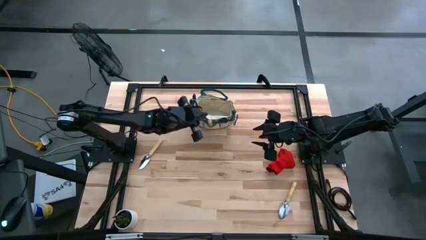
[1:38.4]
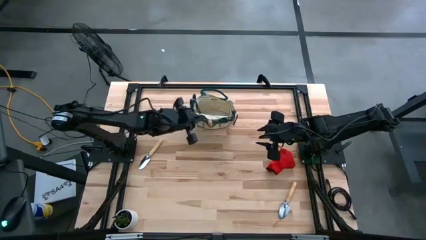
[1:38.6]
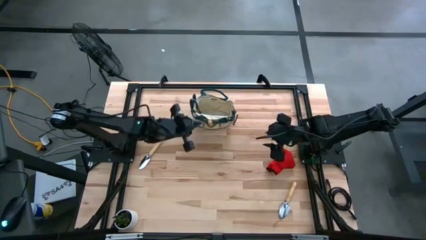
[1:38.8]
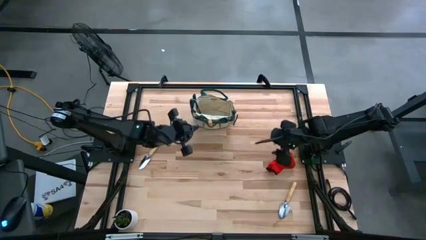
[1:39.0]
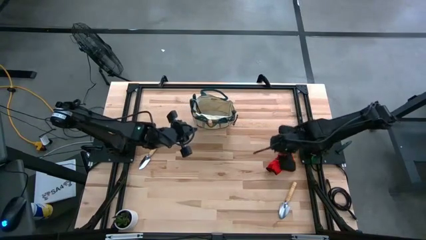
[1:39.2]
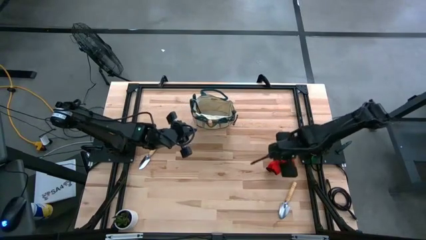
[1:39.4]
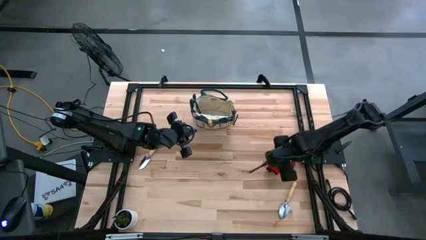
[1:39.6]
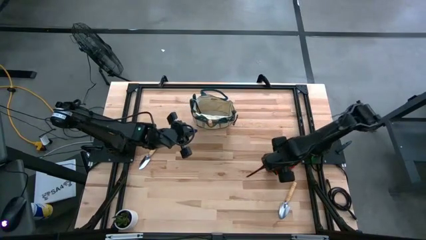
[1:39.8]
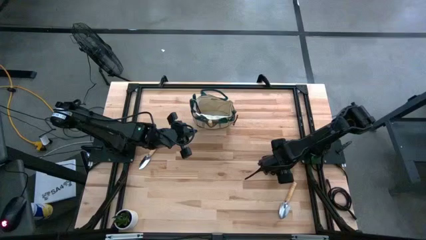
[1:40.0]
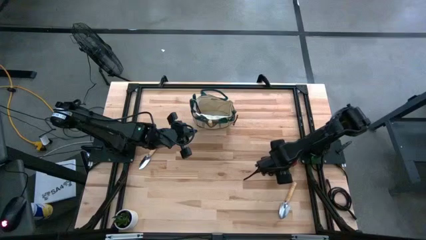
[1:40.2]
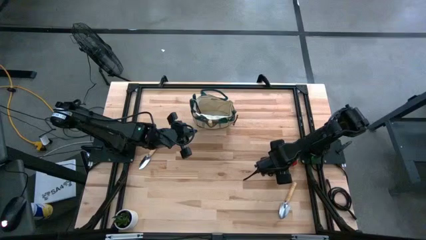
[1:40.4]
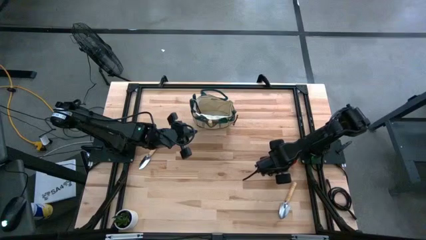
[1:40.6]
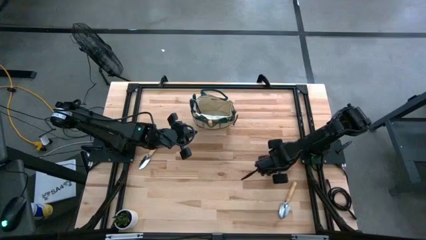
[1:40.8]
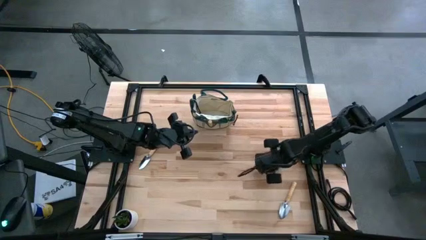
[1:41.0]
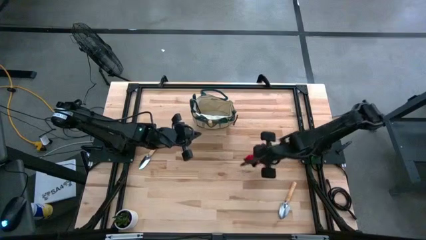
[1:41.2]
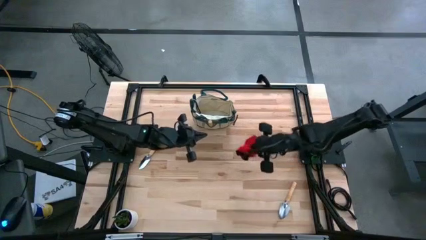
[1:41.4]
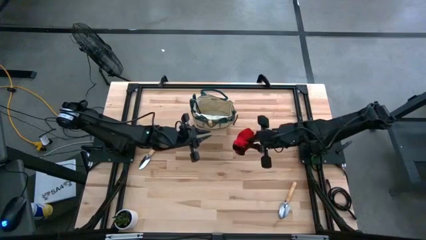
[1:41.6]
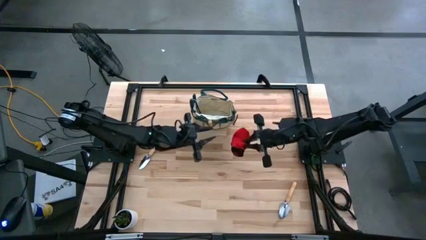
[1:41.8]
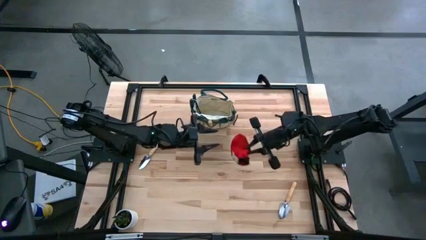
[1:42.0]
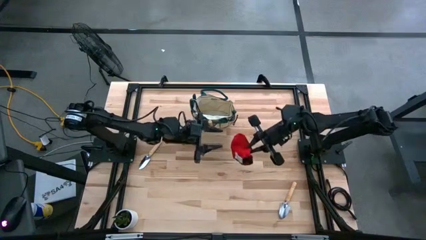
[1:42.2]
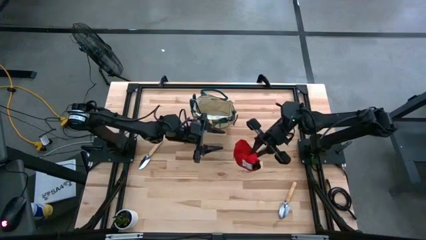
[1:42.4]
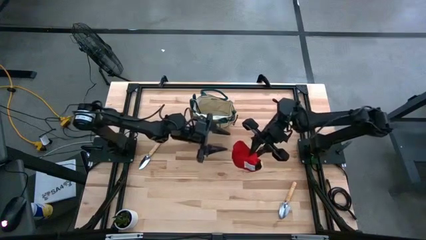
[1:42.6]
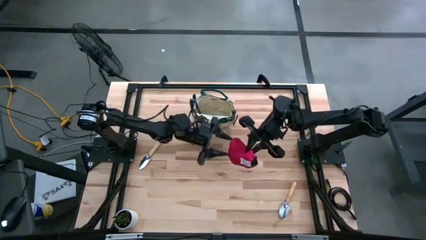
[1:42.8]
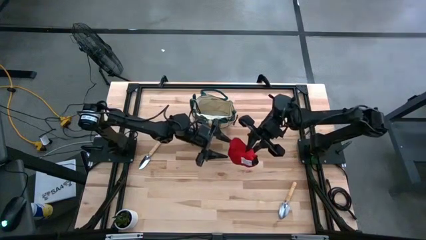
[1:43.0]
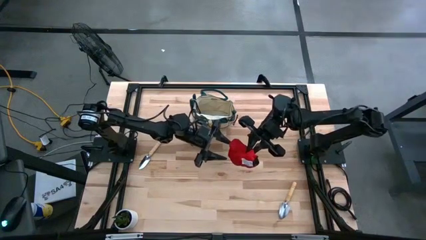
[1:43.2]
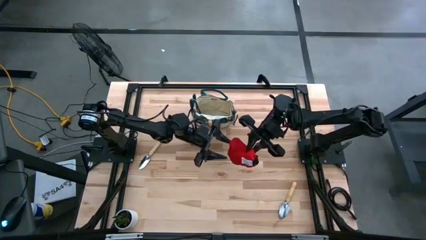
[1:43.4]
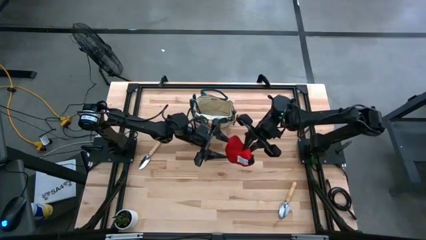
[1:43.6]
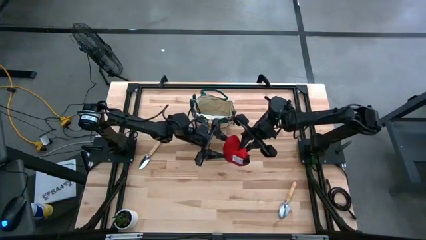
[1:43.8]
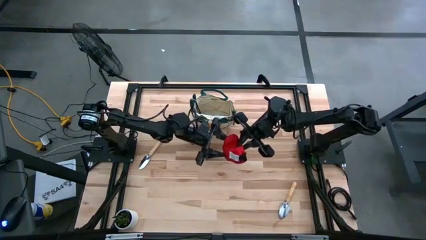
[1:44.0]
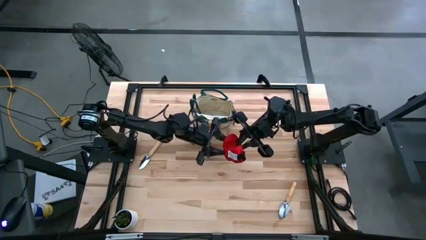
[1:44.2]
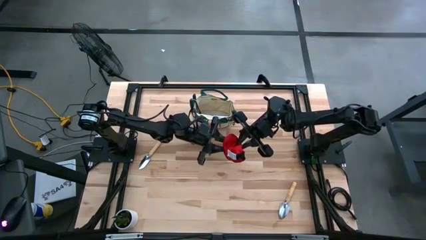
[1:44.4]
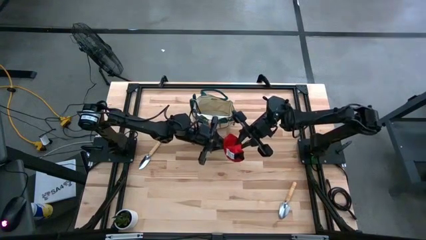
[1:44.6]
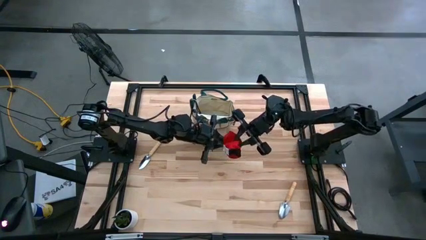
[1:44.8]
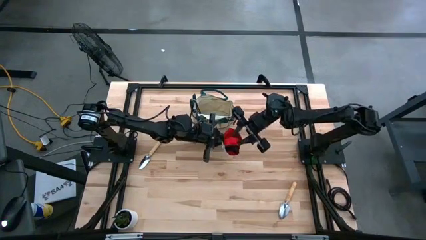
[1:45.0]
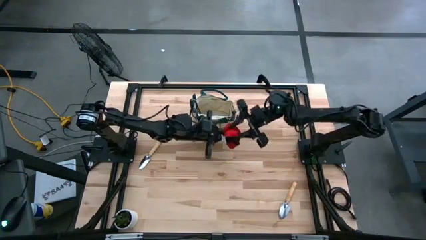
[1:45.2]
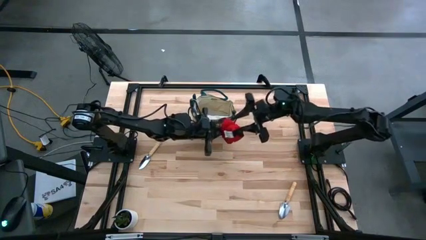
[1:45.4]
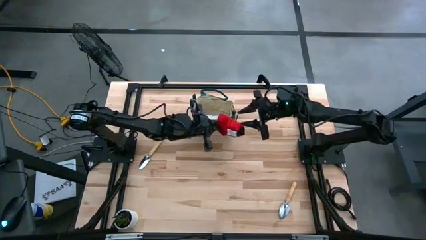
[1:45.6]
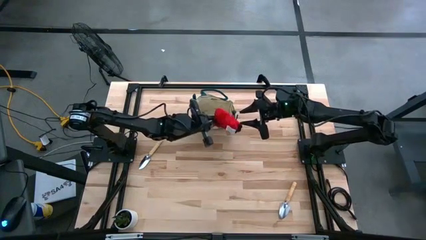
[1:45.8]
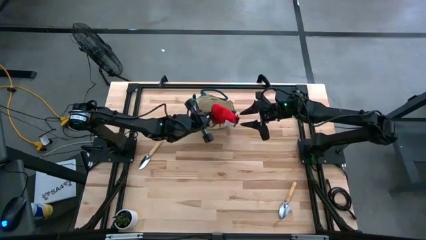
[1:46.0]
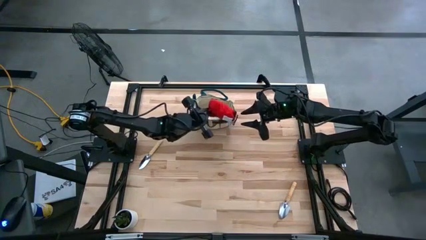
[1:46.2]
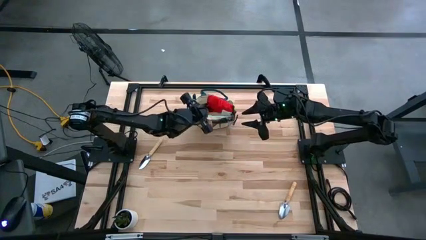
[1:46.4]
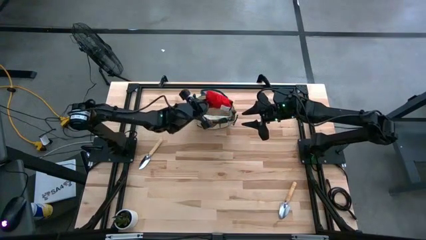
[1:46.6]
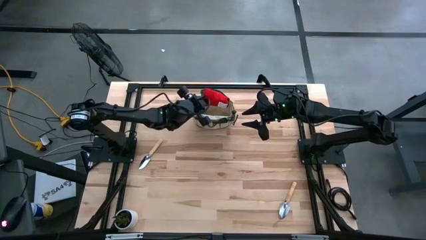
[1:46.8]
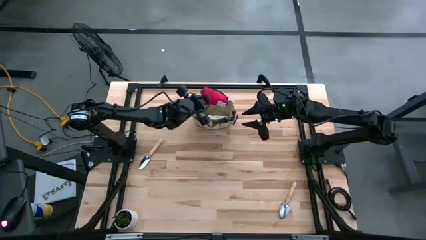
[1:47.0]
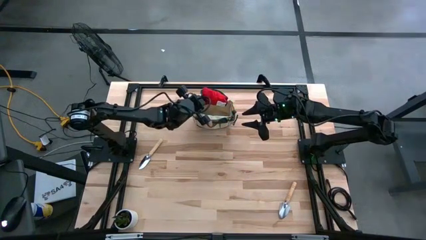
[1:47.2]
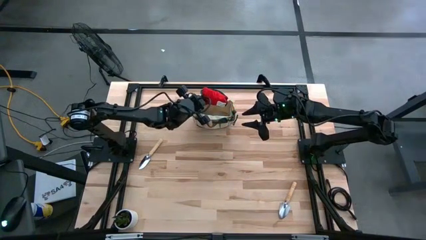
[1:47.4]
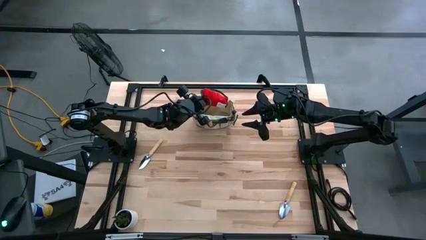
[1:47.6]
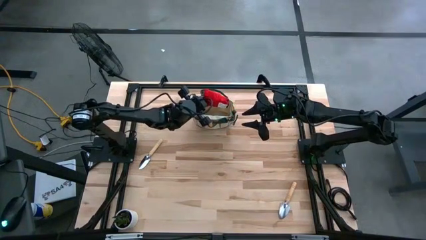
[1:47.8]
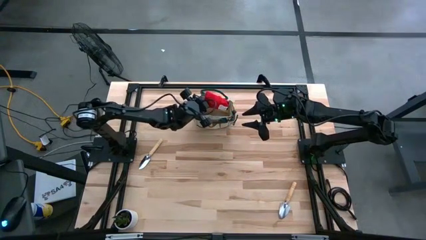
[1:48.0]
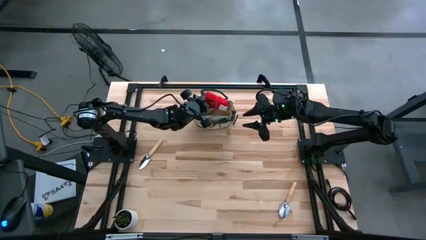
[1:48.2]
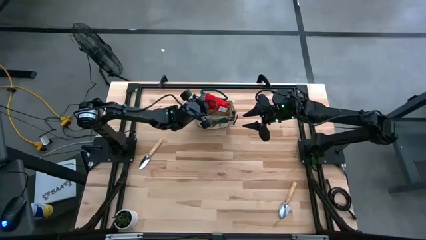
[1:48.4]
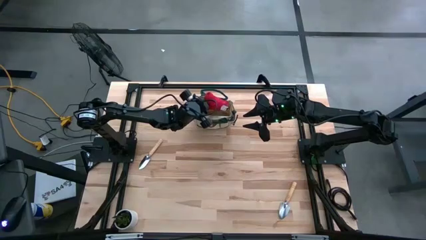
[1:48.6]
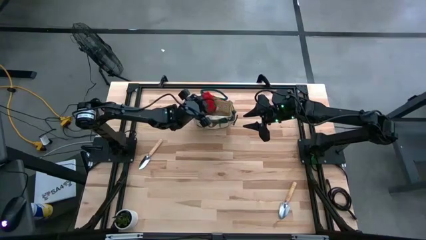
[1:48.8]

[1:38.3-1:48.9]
Task: Pick & Place Garden tools in Gardening bag
Put the gloves into the gardening bag

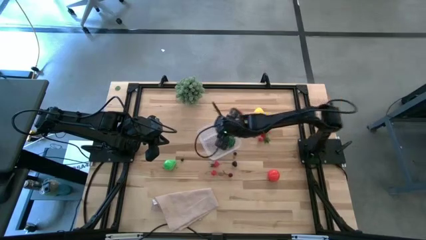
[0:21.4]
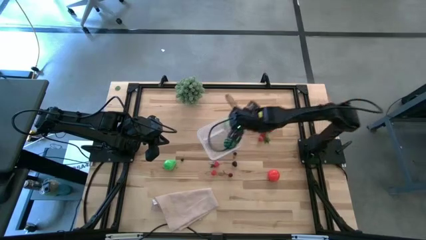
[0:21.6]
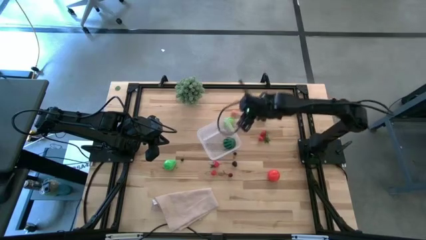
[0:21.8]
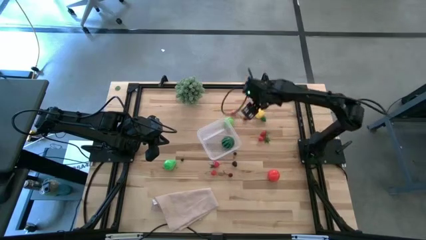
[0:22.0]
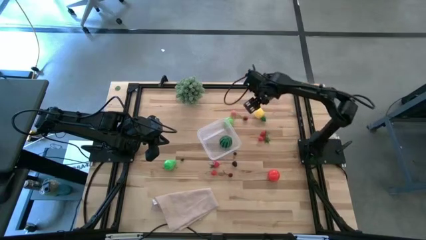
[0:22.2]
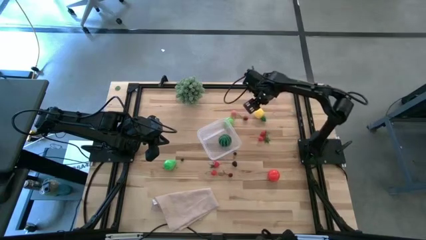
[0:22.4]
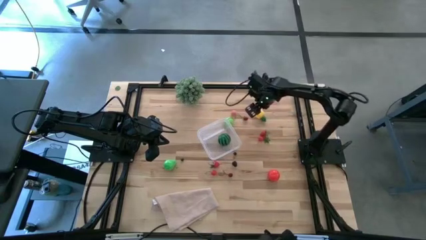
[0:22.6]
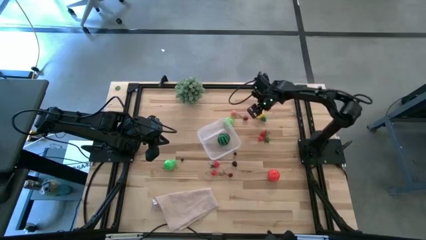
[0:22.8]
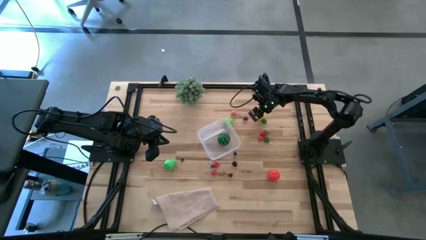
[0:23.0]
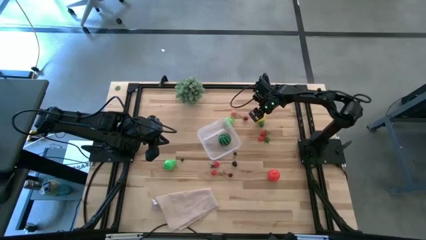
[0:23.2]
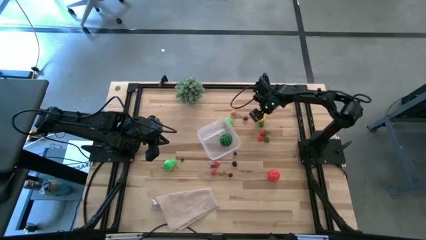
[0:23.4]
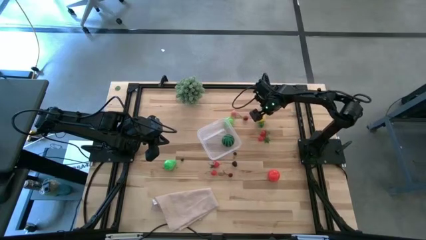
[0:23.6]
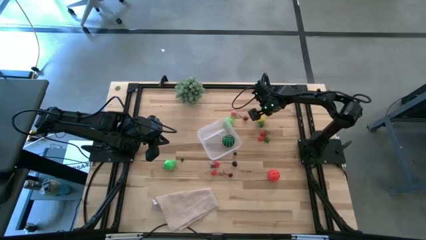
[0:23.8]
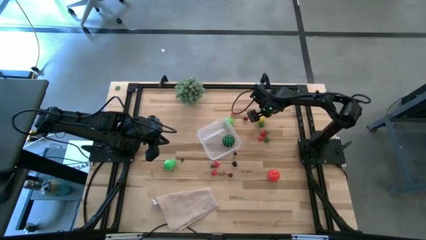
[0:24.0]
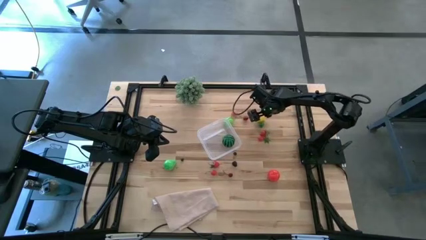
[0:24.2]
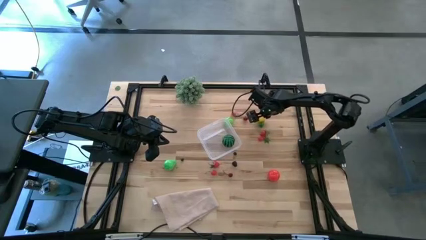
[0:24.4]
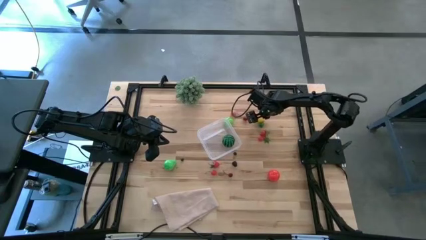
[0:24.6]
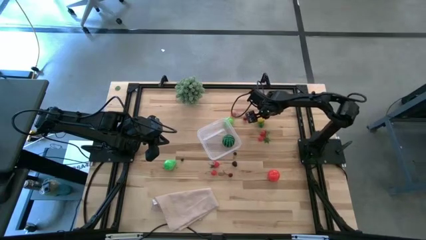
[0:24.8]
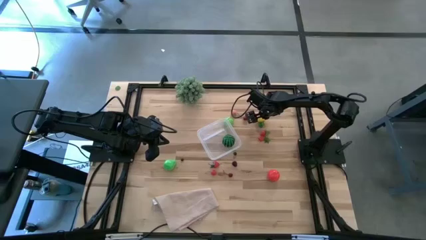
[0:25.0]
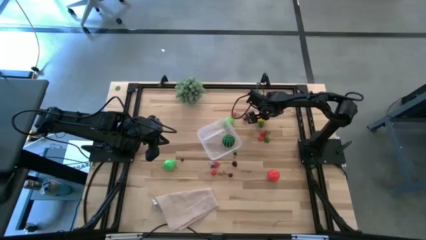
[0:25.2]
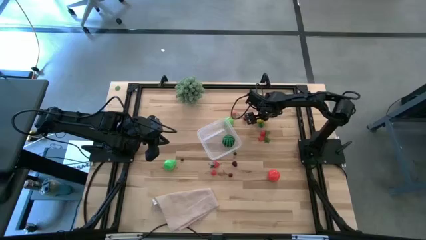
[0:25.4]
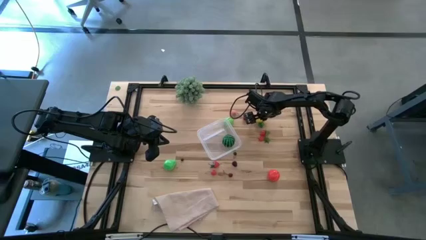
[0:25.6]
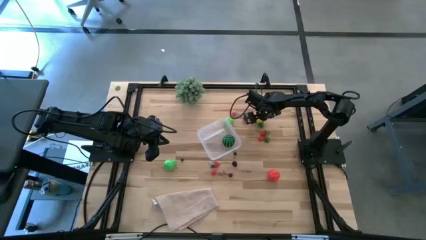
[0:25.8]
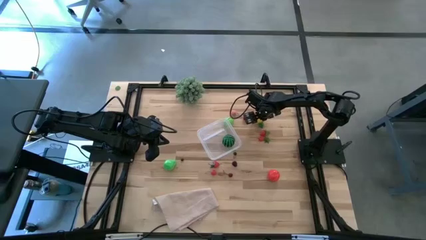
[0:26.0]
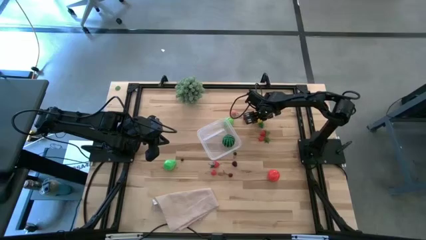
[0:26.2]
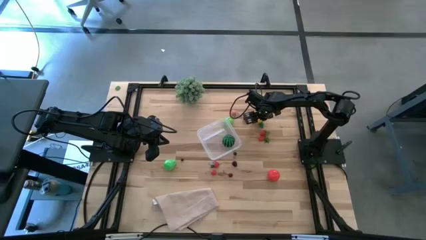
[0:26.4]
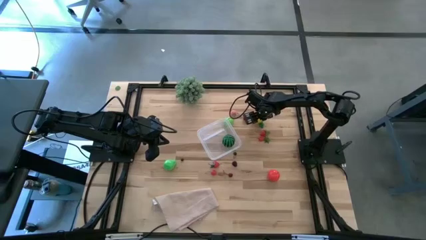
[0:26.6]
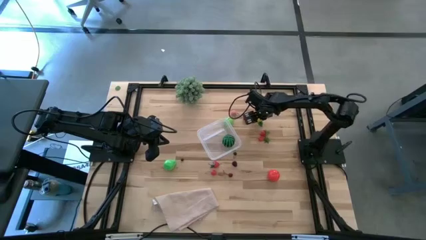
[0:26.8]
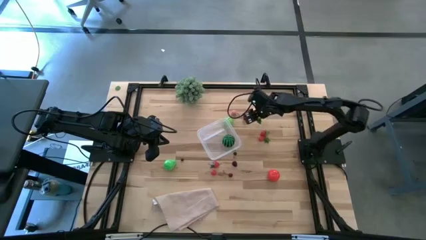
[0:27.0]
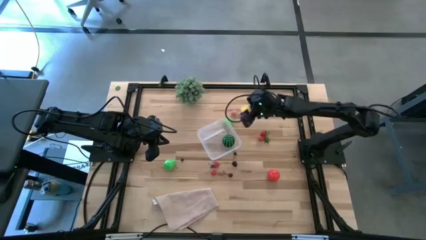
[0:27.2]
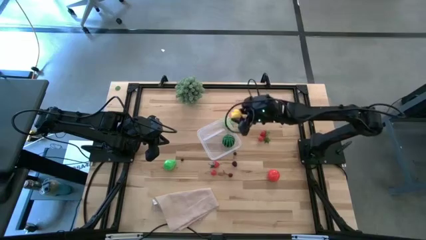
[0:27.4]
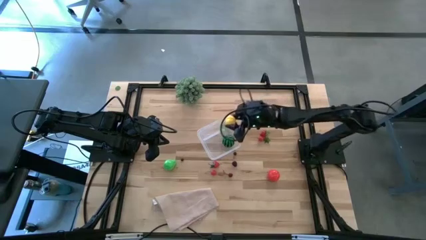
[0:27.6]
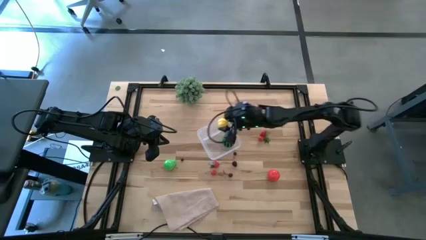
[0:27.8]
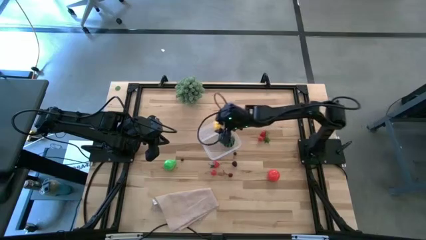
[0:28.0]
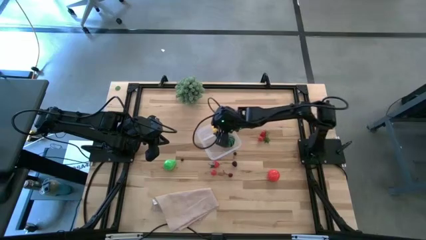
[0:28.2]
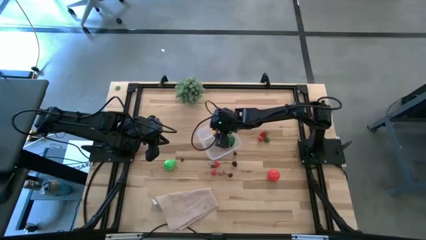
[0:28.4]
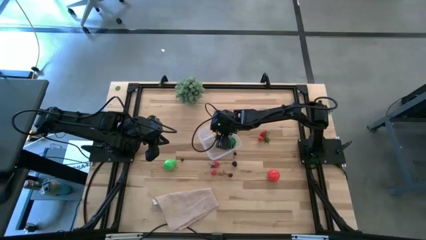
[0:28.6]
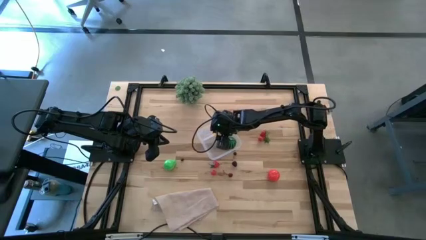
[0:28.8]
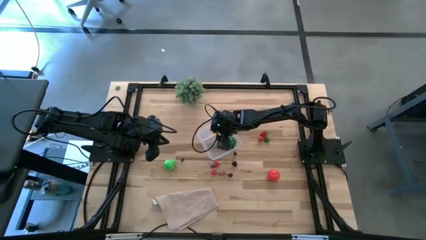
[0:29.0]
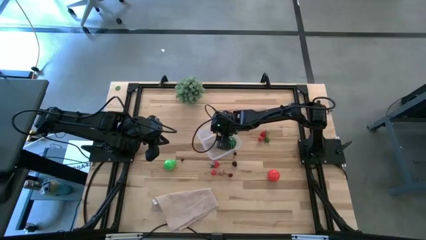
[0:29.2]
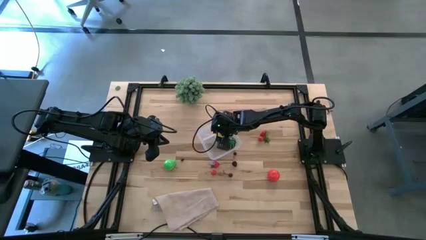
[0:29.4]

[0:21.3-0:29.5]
Task: Pick and placing Produce into tupperware
Put the yellow pineapple into the transparent bin
